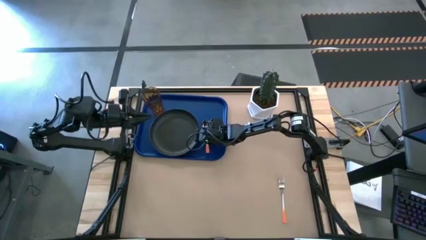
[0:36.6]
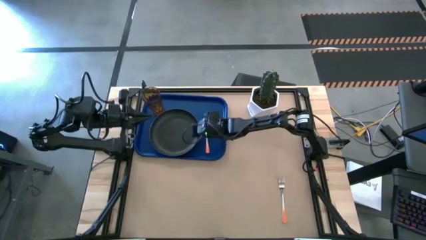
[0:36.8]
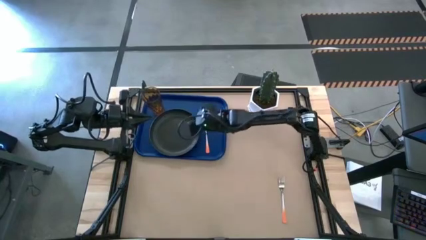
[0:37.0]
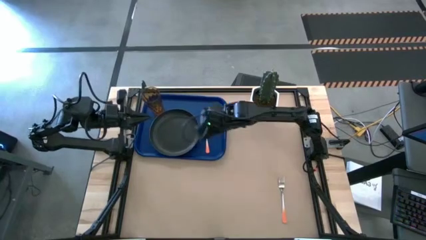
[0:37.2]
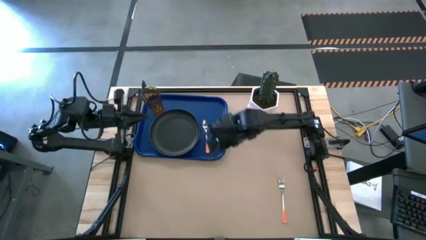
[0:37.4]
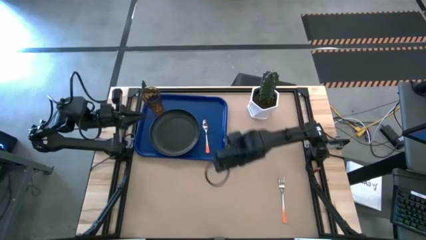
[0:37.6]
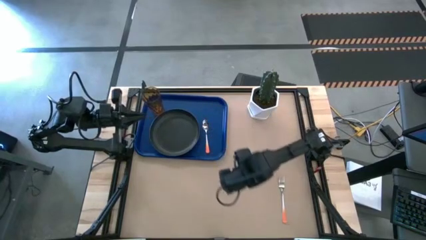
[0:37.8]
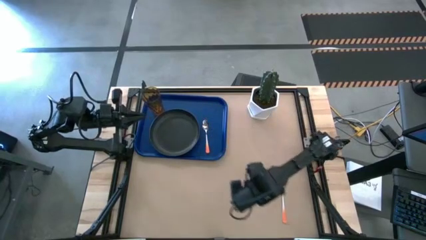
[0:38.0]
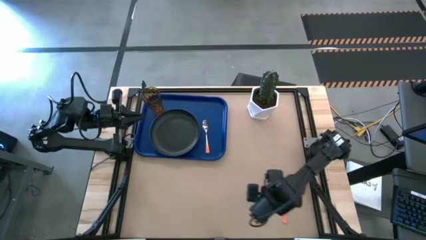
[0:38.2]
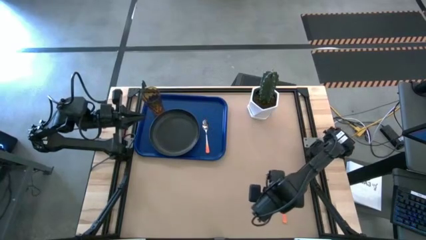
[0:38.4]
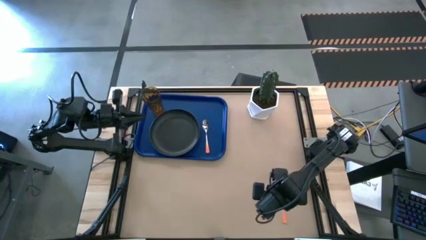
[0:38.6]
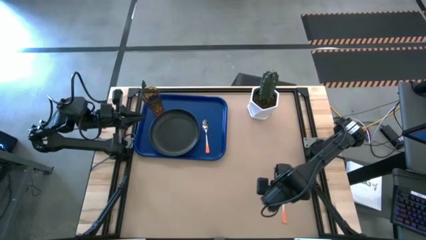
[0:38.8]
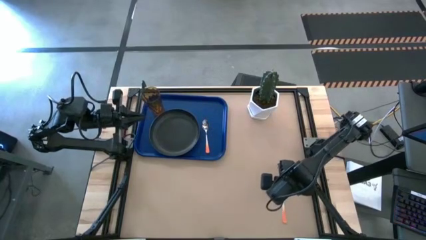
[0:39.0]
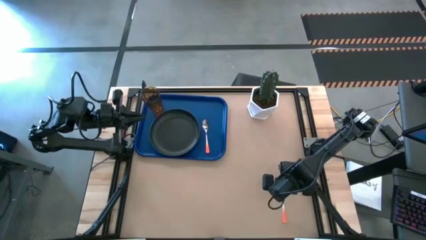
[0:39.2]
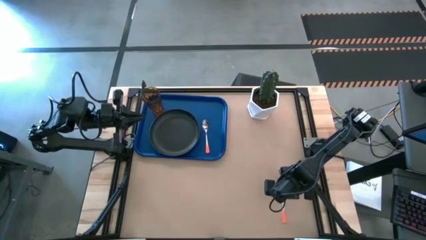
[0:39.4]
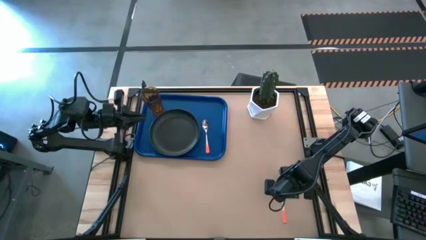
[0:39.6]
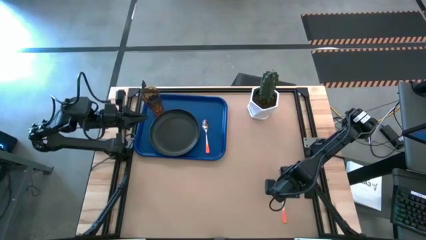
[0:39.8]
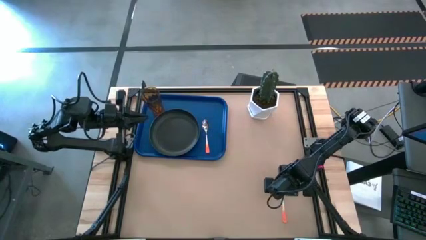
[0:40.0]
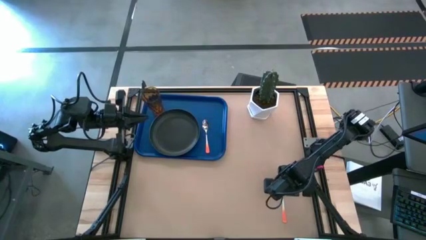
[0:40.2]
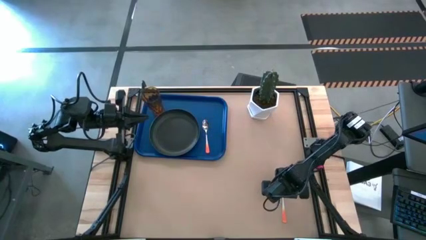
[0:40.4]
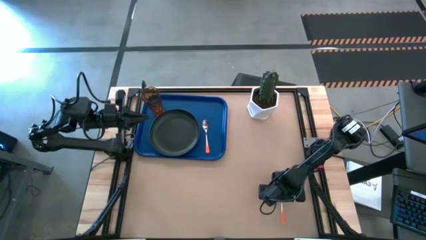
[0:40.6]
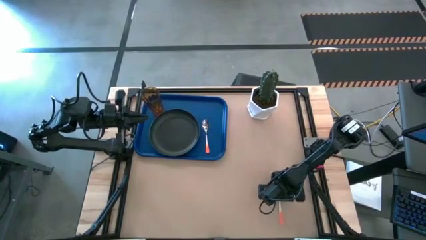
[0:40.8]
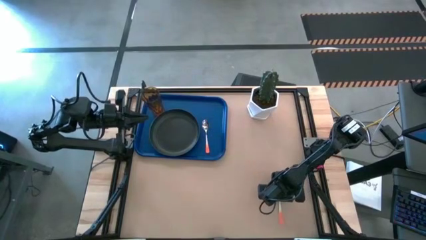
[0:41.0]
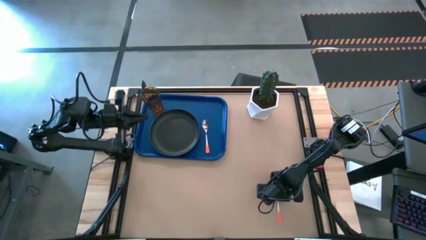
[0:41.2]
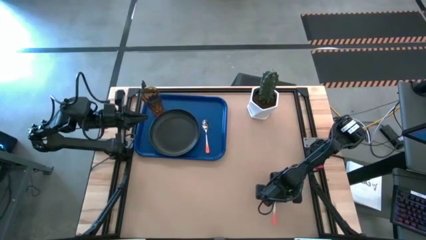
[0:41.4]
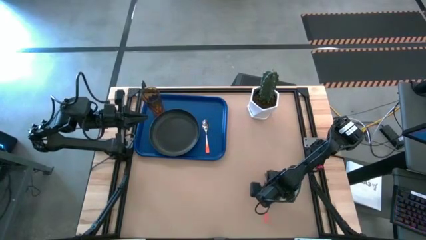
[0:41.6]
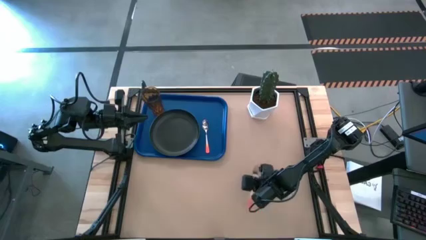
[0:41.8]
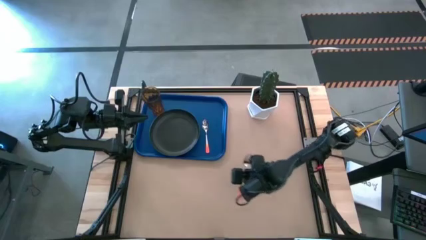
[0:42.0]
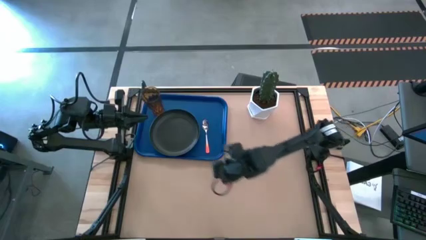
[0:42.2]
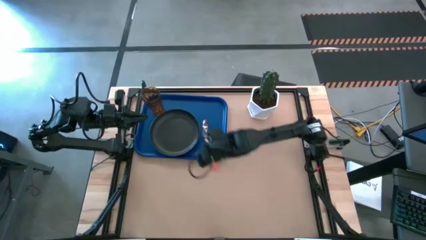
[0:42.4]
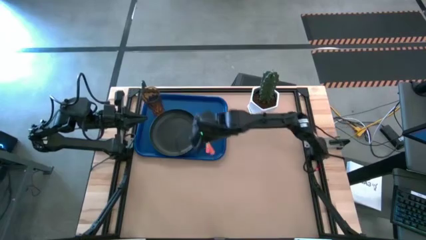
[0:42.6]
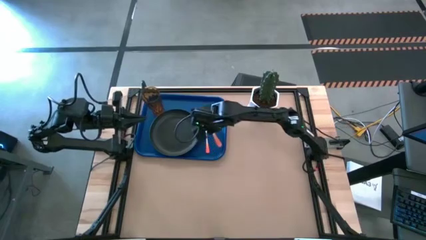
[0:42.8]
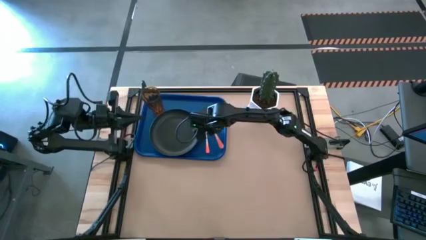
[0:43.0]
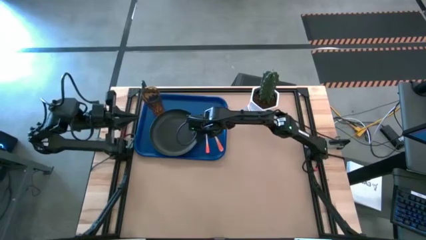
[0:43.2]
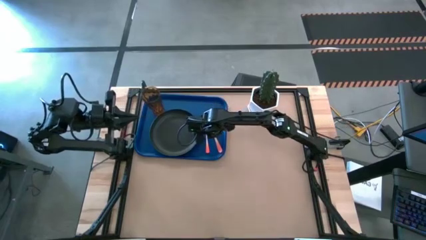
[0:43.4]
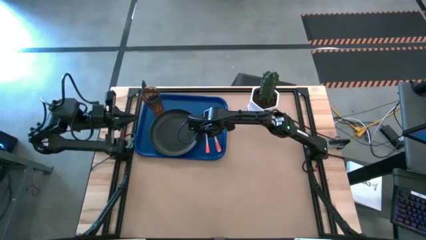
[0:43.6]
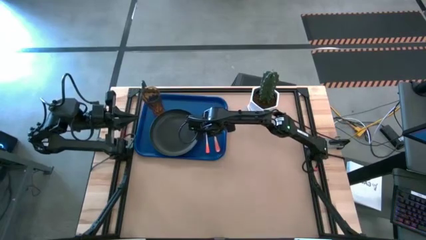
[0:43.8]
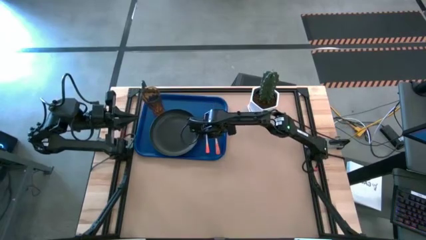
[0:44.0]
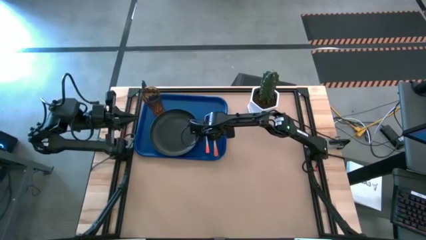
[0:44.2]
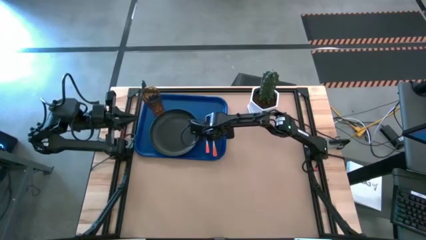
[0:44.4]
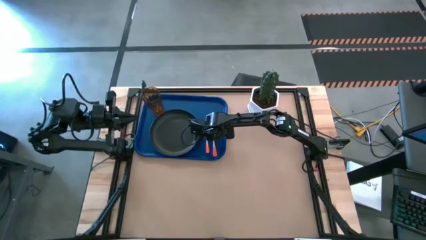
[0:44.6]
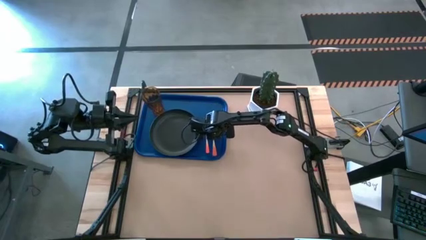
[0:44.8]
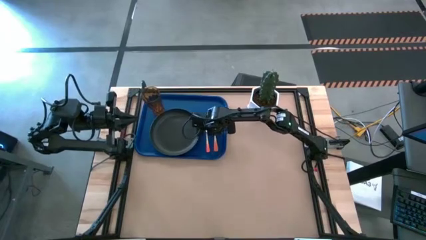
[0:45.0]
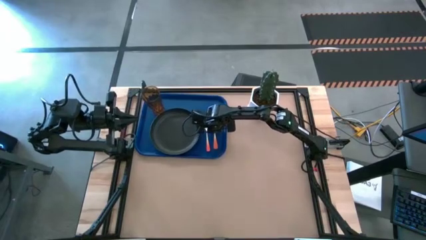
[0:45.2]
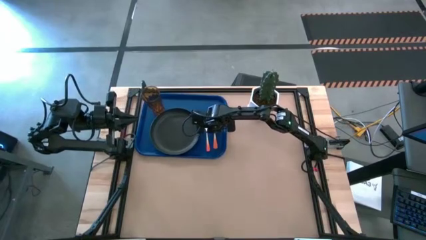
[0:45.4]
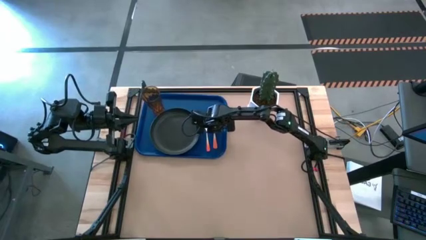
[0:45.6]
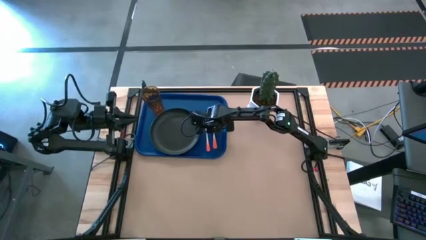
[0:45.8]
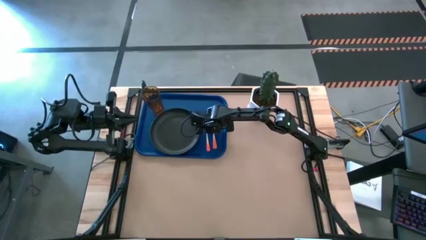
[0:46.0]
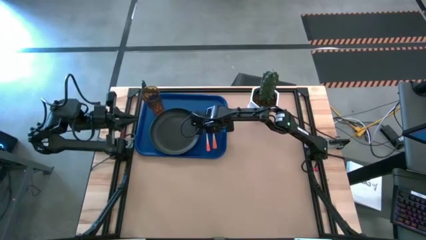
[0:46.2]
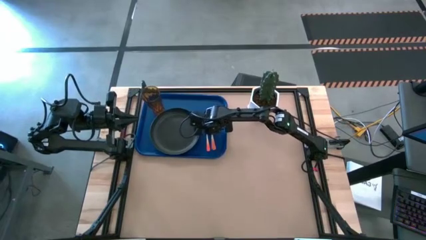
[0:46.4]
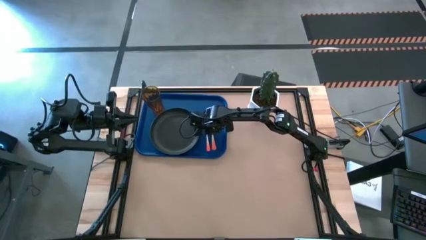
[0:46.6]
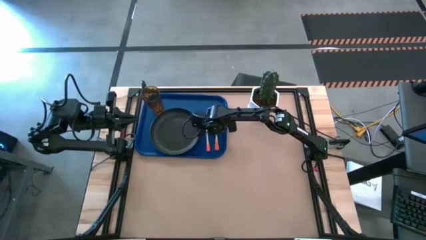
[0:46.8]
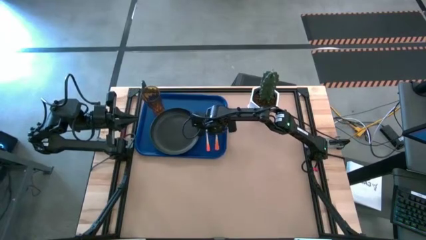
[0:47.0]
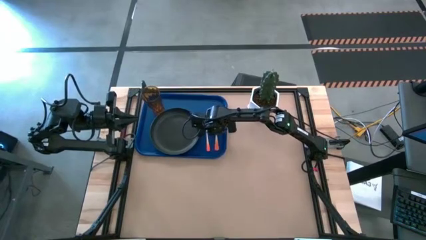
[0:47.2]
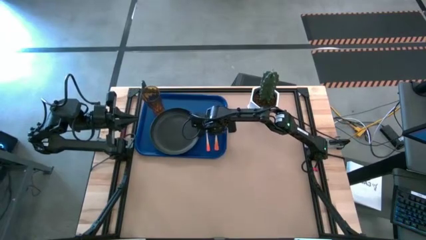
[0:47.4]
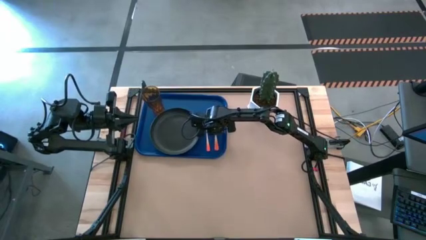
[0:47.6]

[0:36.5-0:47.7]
Task: Pick and place plate/cup/fork/spoon on tray
Put the orange fork on the blue serving tray to the right of the orange spoon

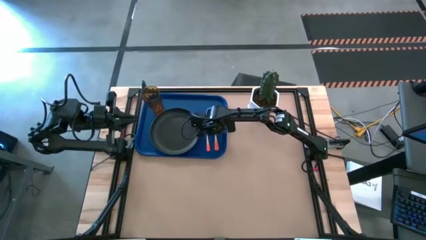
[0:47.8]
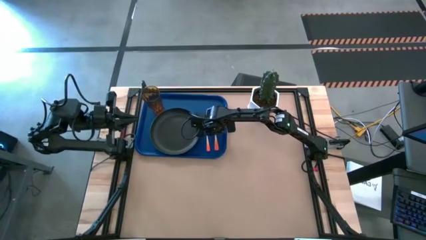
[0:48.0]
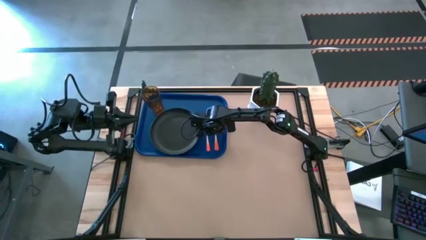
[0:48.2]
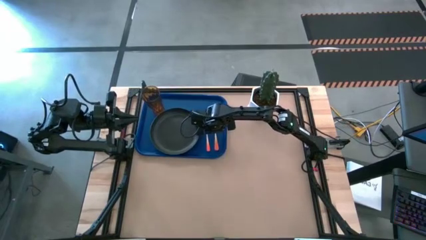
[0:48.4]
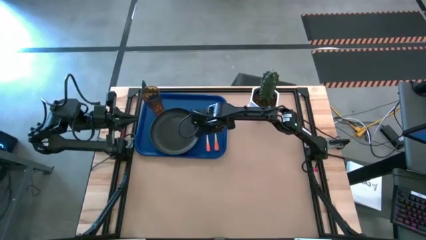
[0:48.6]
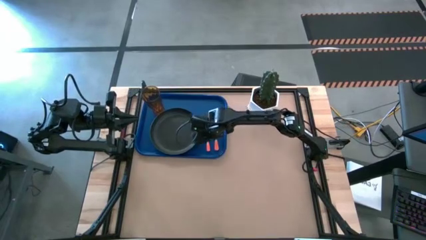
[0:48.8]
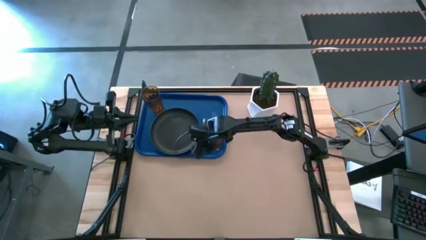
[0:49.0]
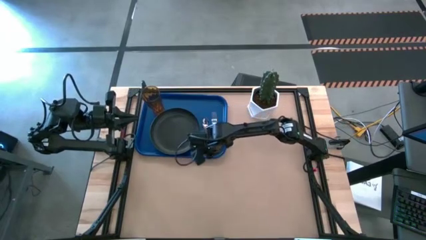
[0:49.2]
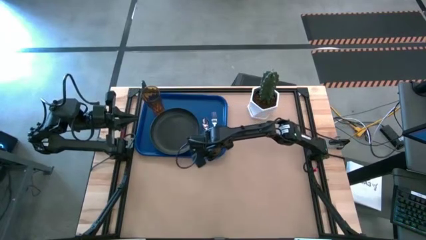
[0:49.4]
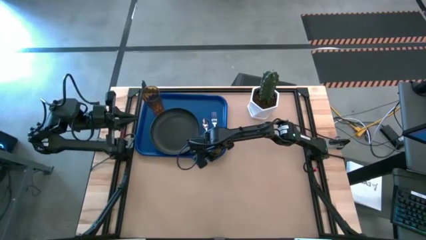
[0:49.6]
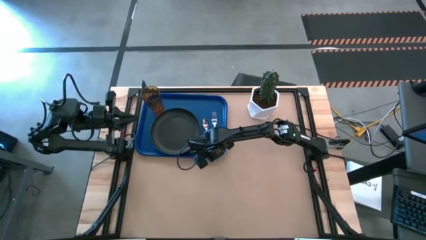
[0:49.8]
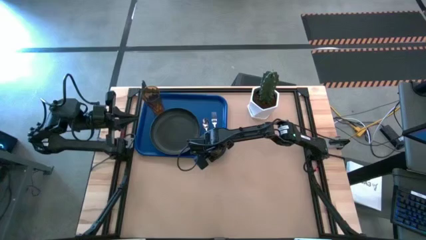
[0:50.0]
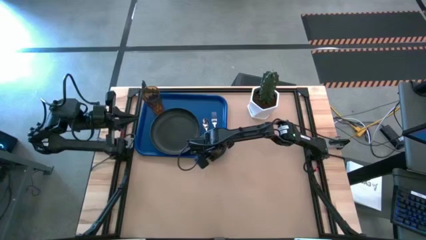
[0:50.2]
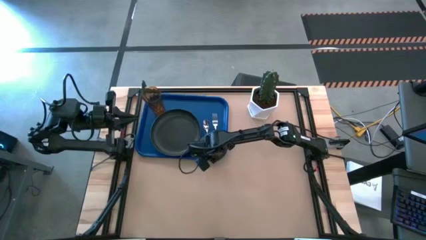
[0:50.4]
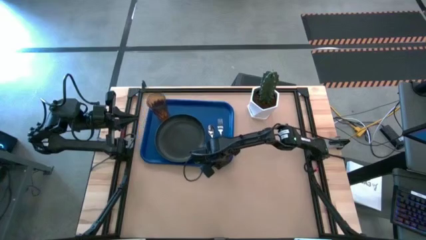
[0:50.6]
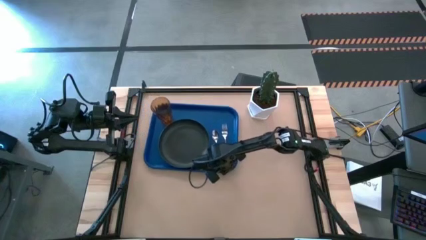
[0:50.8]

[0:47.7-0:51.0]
Move the blue serving tray to the center of the table

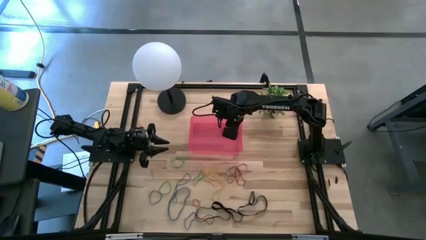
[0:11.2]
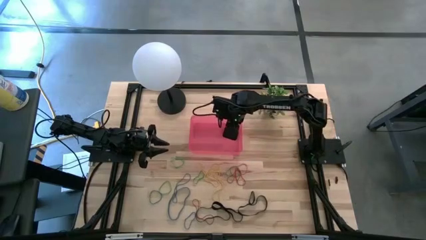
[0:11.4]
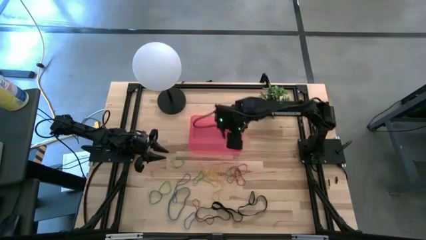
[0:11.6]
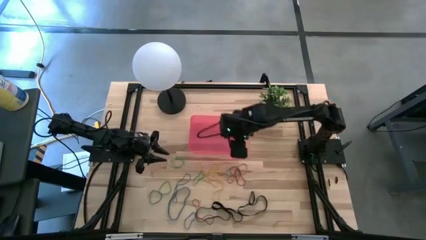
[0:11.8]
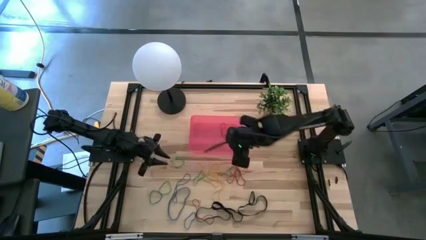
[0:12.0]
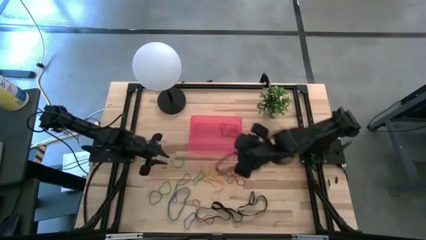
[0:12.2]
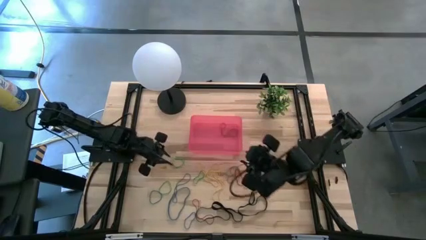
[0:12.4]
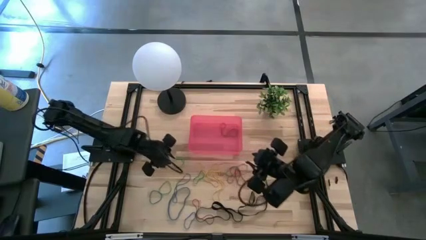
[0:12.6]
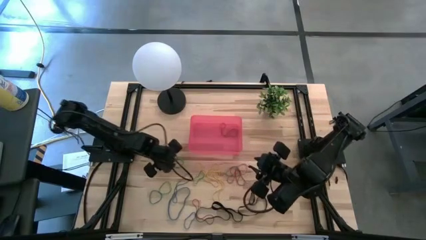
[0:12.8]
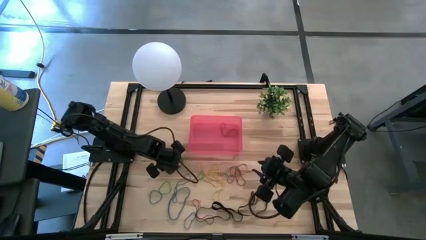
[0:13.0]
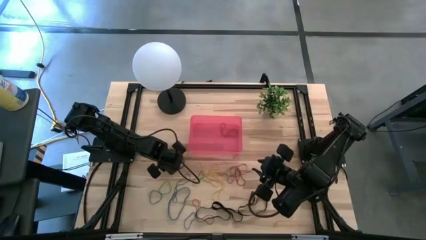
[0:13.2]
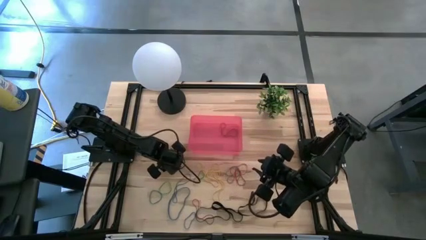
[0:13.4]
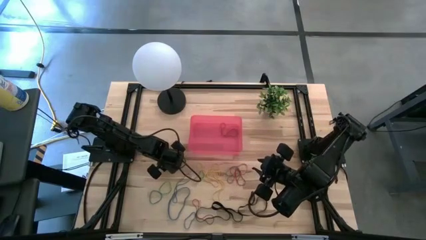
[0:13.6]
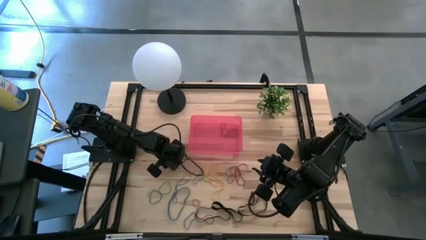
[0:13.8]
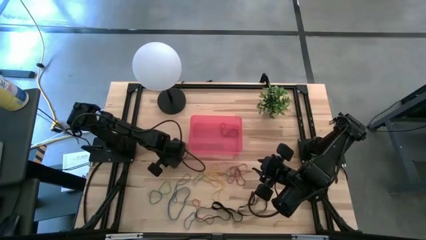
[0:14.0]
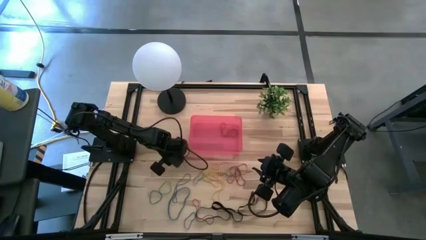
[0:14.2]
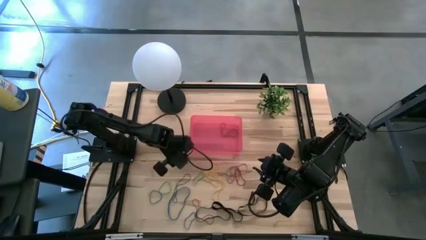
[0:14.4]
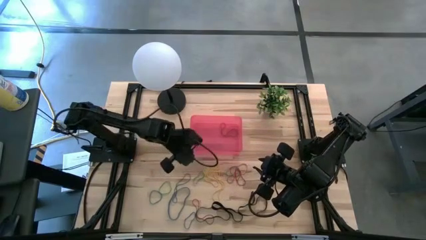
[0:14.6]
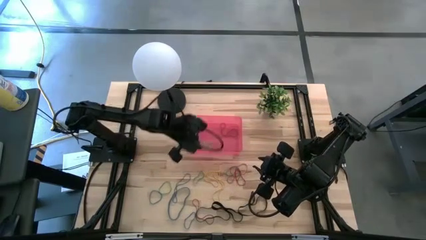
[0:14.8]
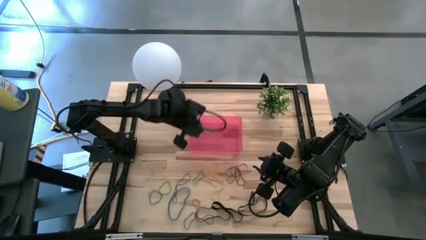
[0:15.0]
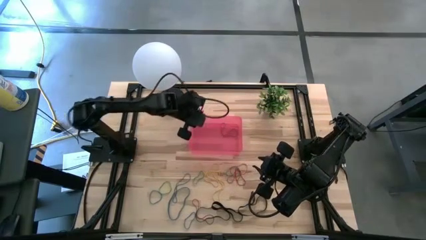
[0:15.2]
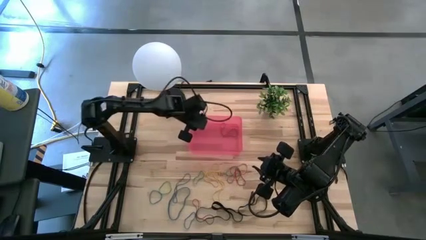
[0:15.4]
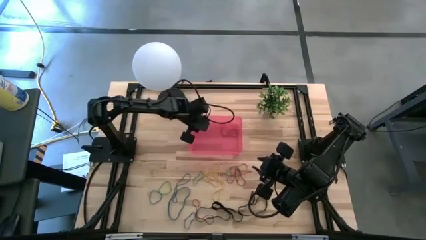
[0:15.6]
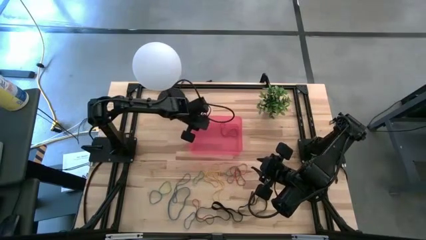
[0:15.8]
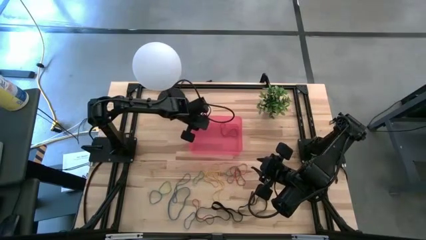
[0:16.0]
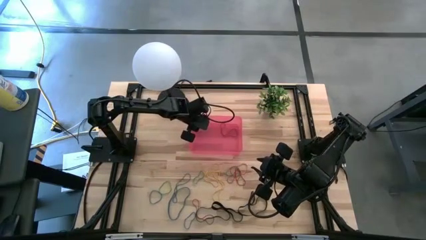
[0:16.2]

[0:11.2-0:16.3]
Task: Pick and place rubber bands into bin
Put the green rubber band into the red bin
